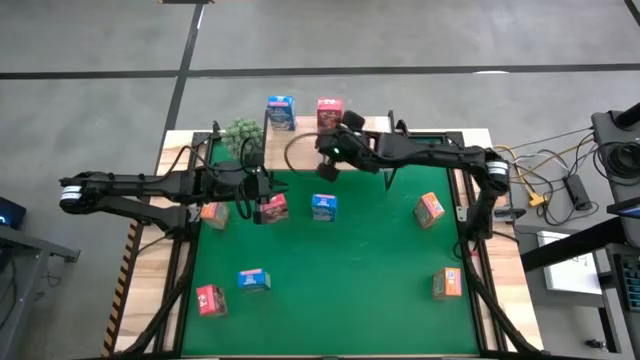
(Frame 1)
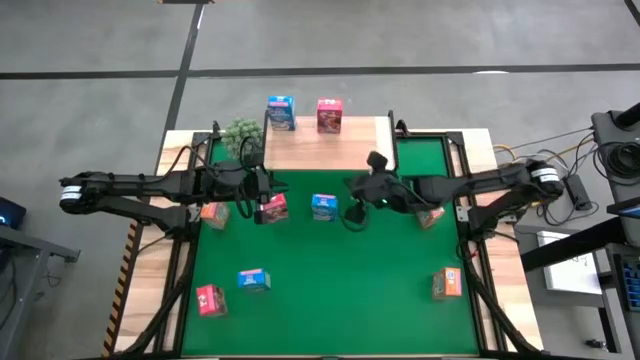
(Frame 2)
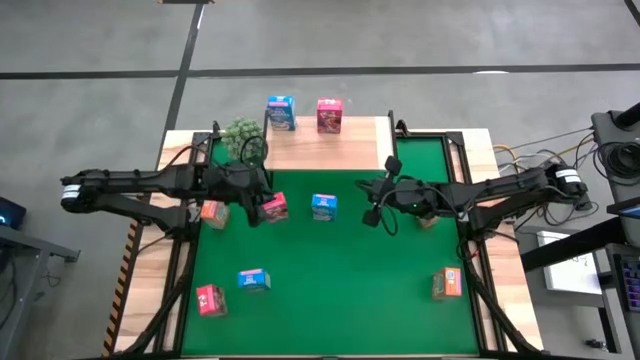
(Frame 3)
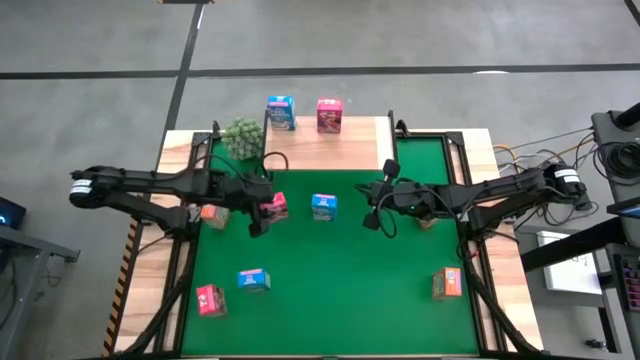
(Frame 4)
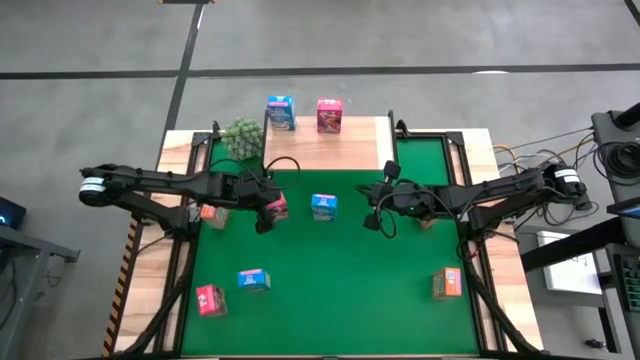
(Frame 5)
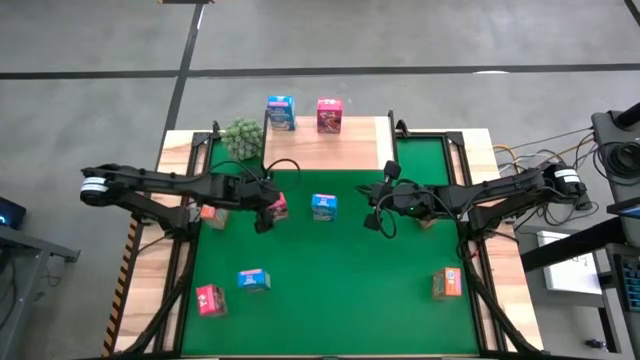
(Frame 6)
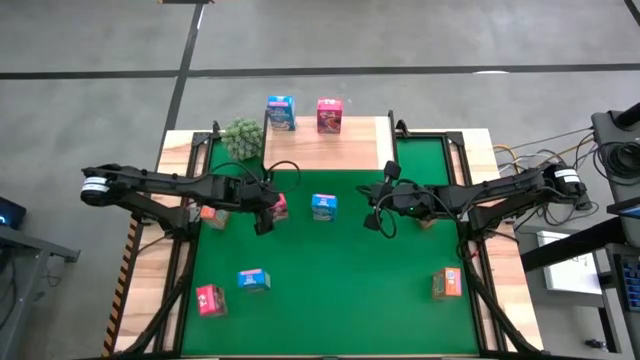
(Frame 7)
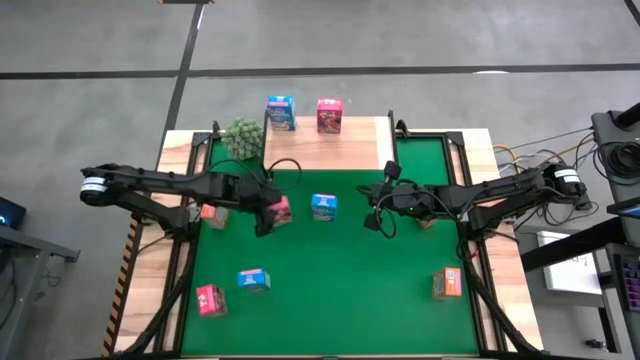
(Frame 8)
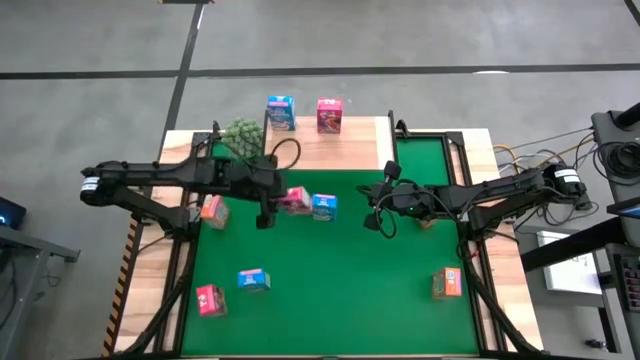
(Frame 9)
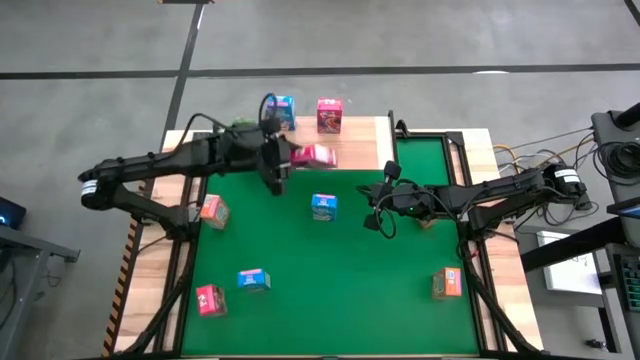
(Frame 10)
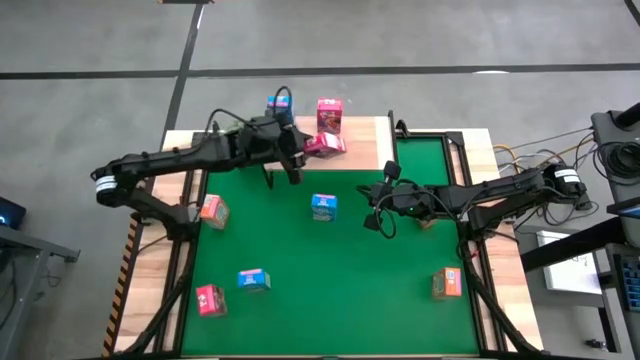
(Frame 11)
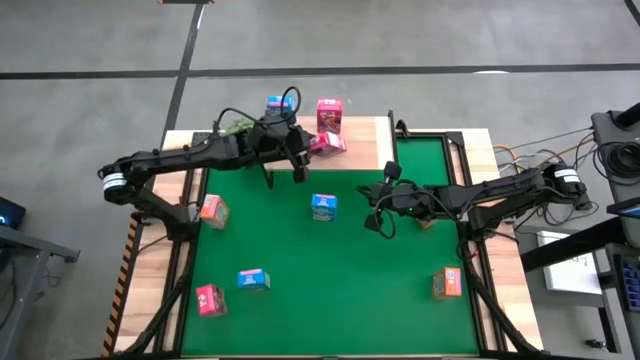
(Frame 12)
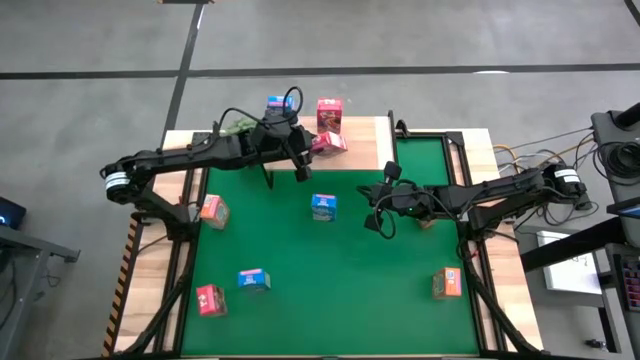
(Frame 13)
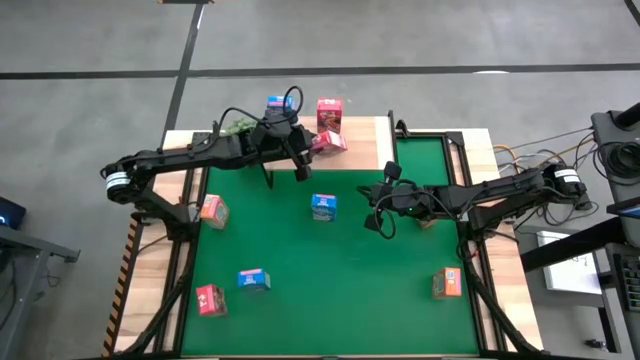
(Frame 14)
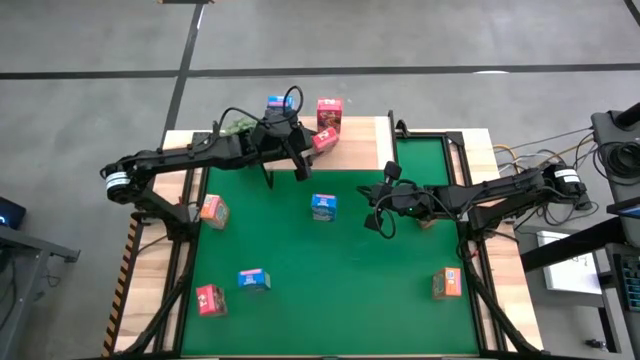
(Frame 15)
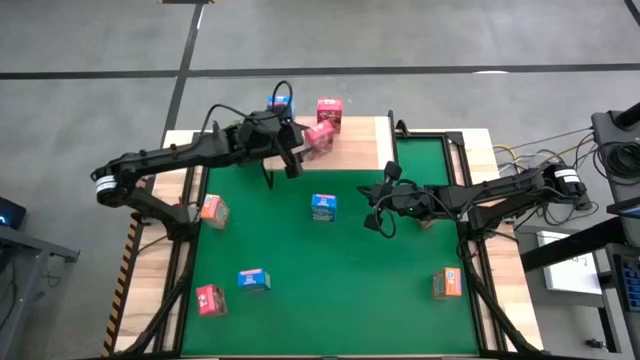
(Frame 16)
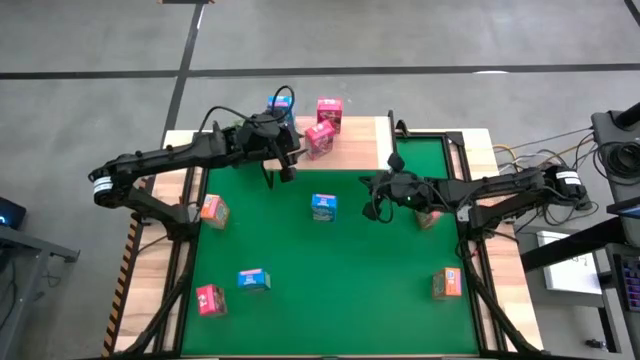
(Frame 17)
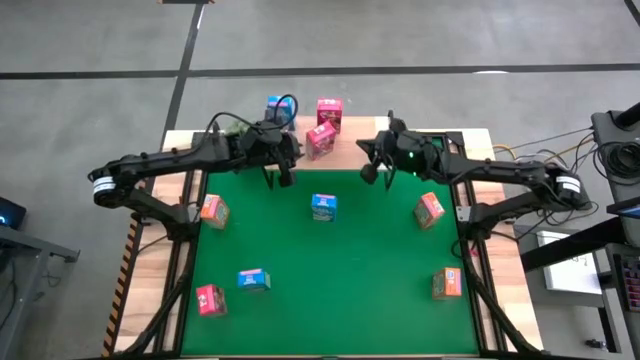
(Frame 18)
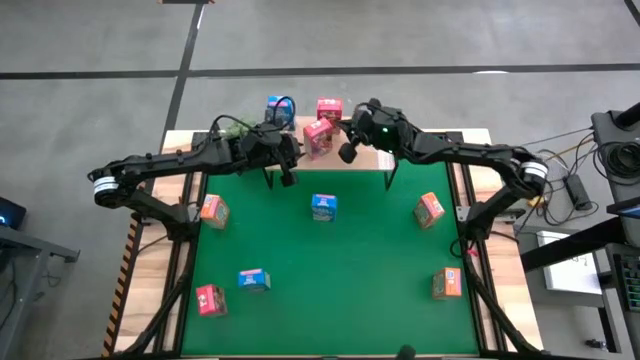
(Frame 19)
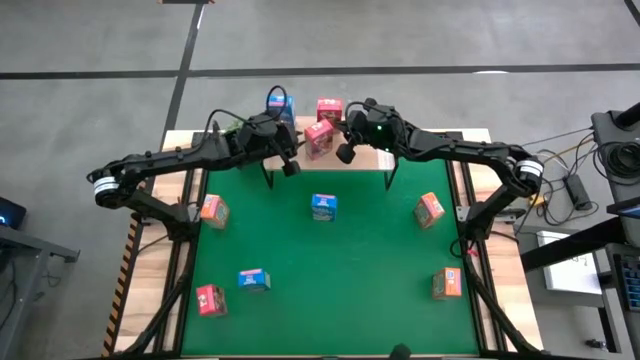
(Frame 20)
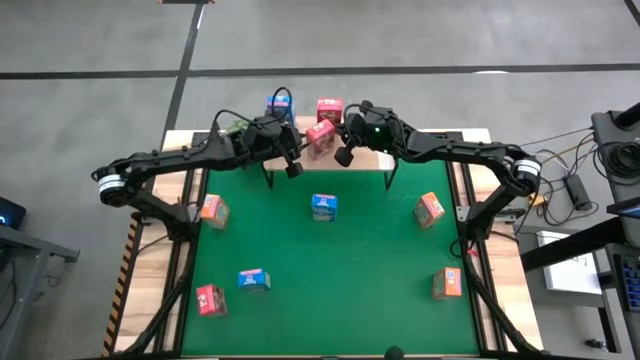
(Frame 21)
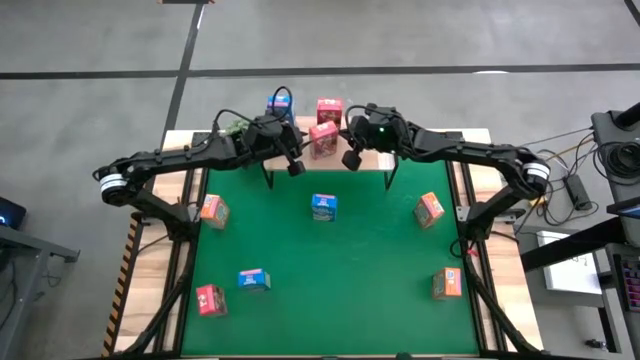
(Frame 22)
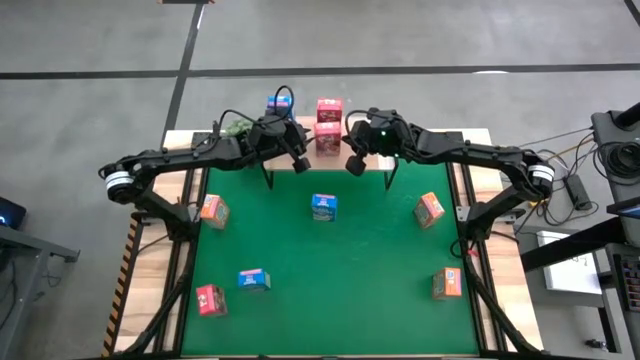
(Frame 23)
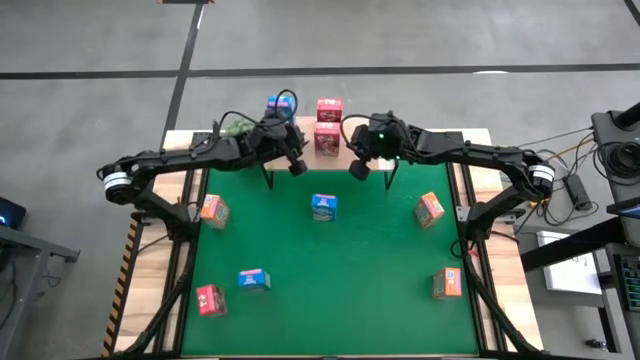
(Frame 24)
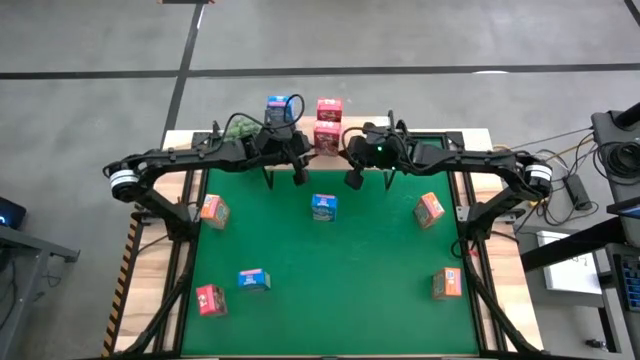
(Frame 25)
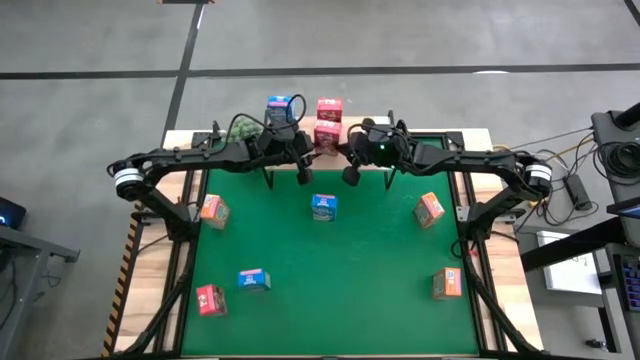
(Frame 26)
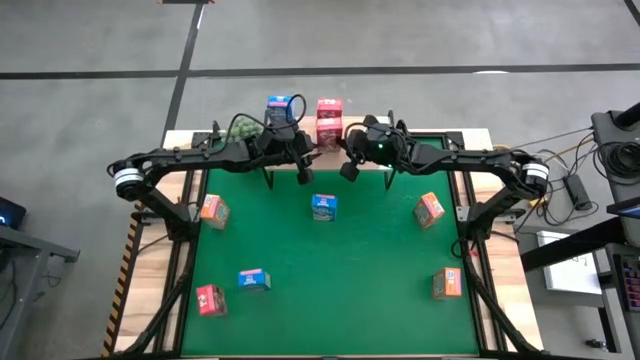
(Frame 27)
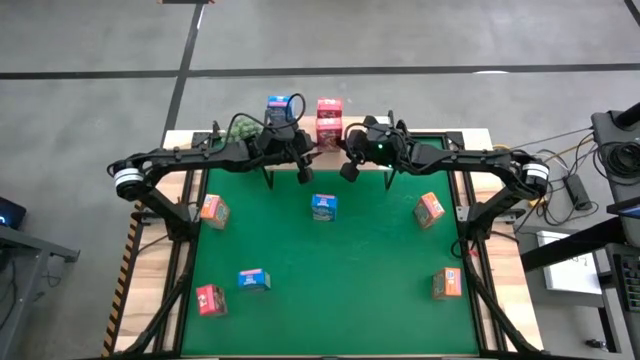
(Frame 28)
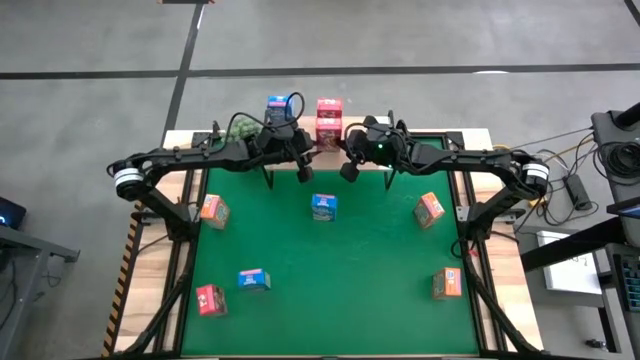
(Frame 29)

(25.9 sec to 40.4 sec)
Task: Stack cereal on shelf
Put the top red cereal box on the shelf aligned with the other red cereal box

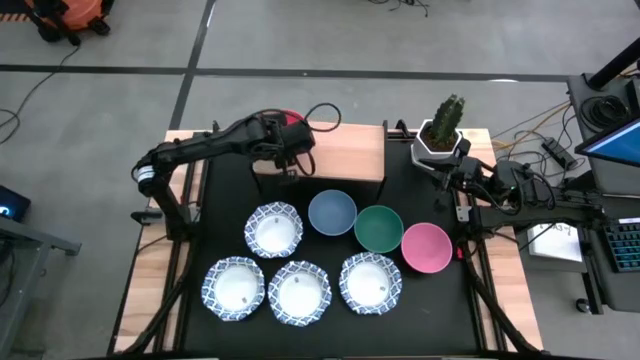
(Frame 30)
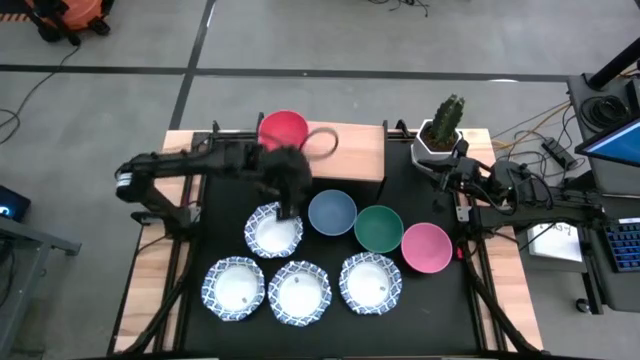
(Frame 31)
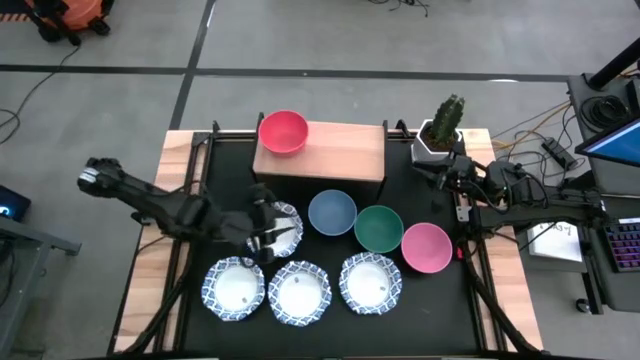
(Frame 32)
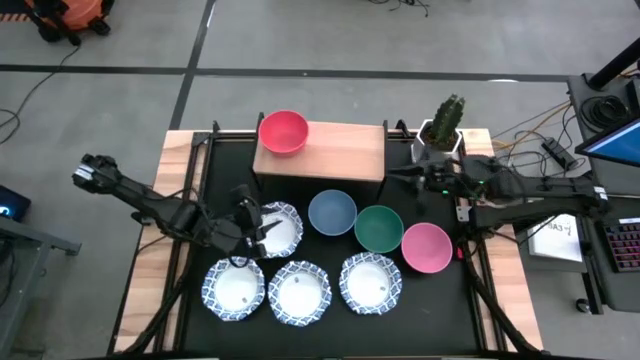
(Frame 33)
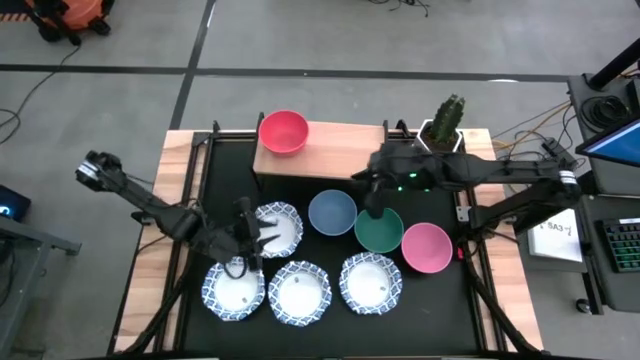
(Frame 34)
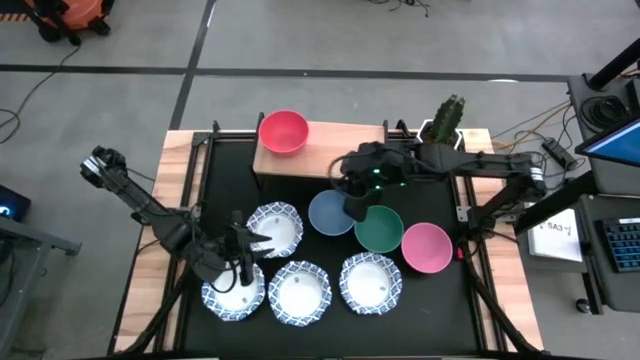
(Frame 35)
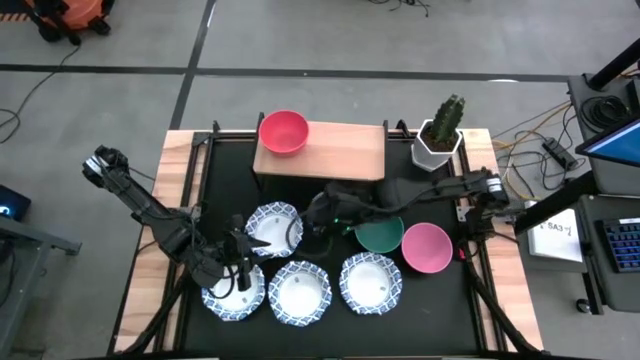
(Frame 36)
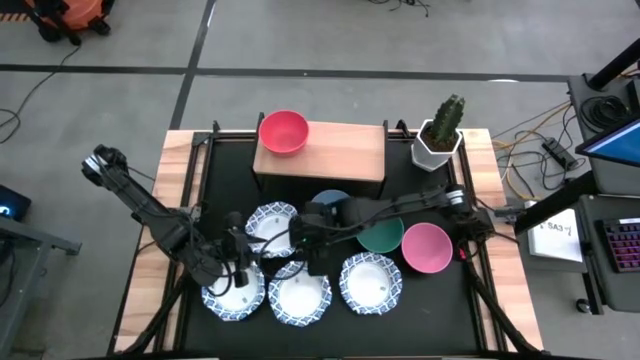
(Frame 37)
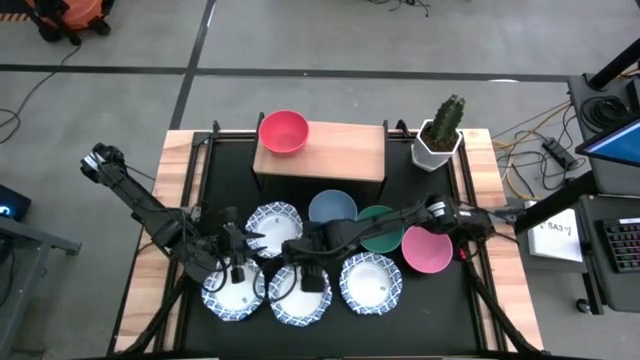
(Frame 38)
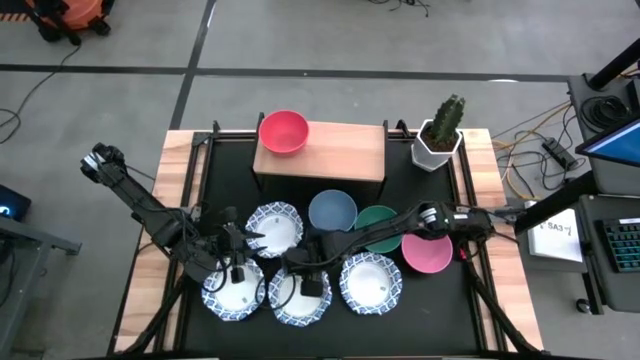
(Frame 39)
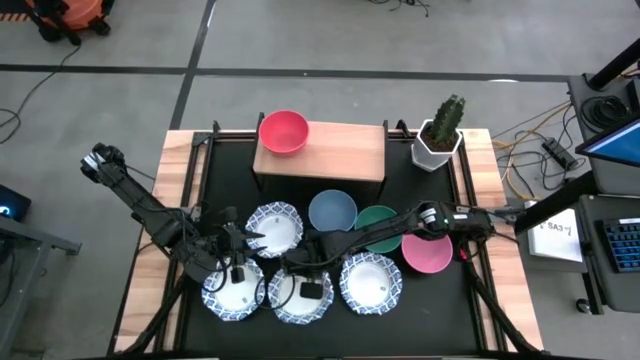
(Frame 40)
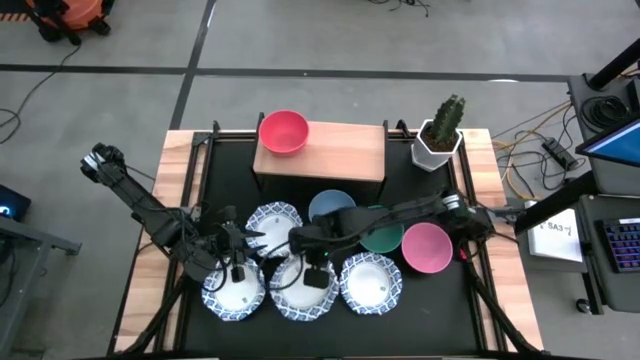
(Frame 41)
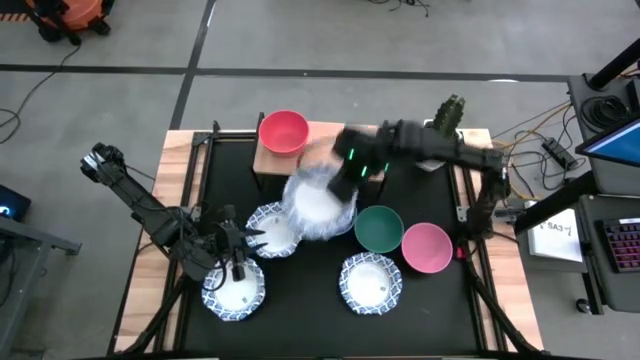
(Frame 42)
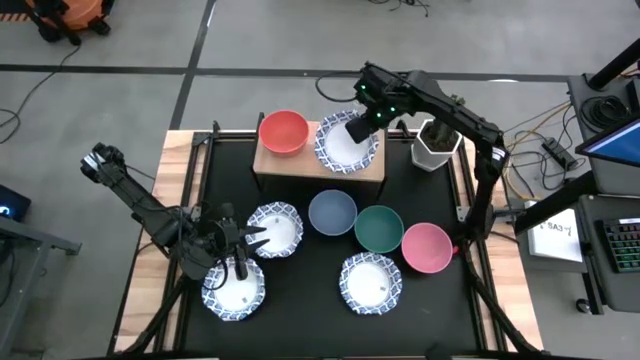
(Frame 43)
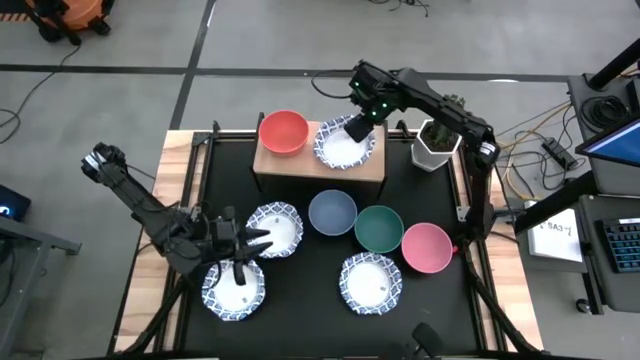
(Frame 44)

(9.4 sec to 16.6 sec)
Task: Place and stack bowls onto a shelf
Put the white bowl on the shelf
